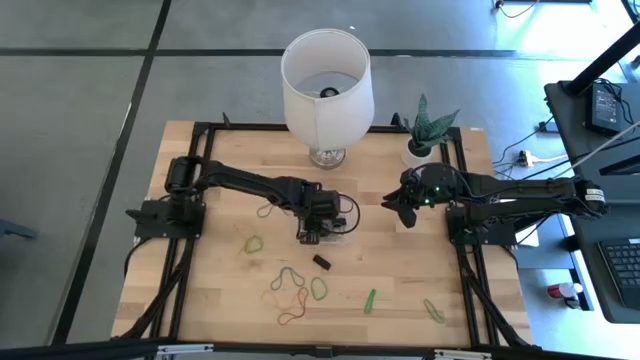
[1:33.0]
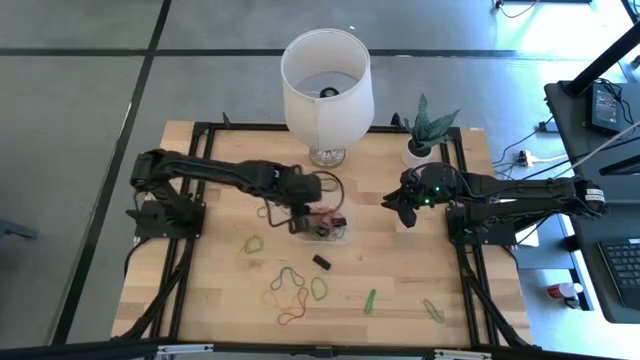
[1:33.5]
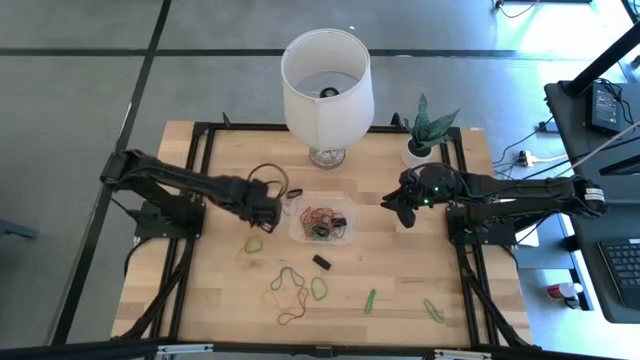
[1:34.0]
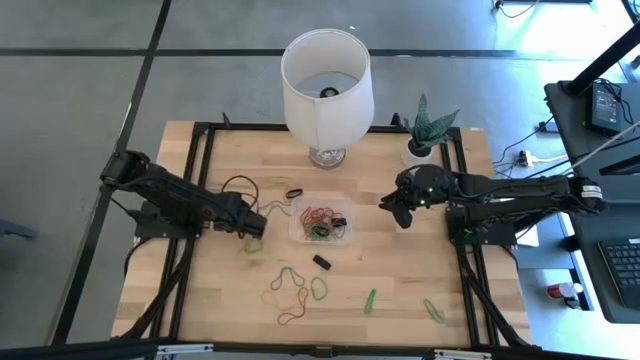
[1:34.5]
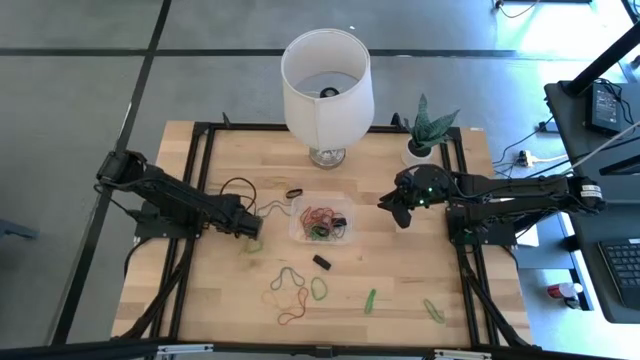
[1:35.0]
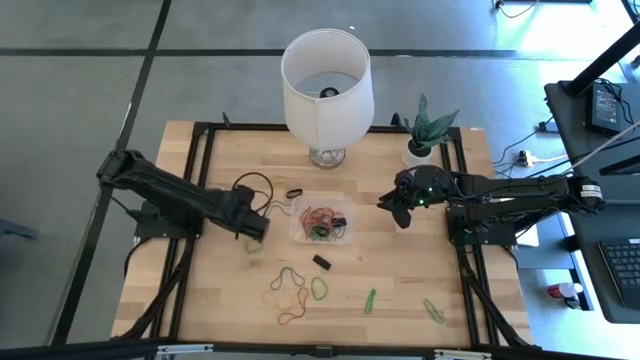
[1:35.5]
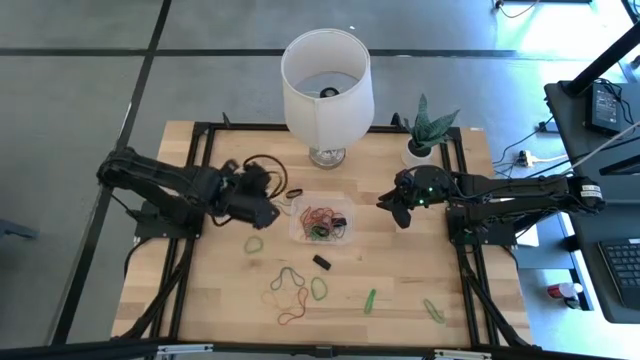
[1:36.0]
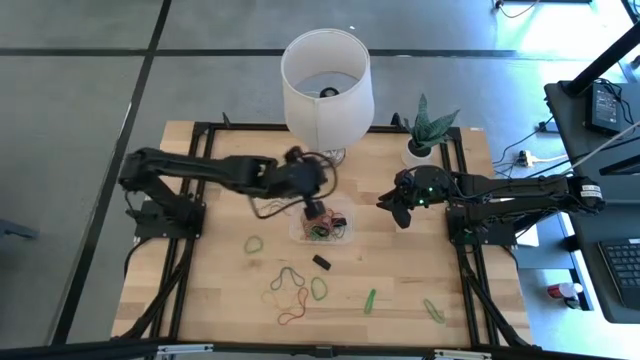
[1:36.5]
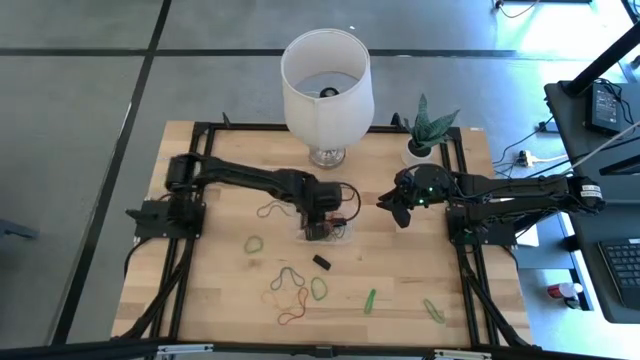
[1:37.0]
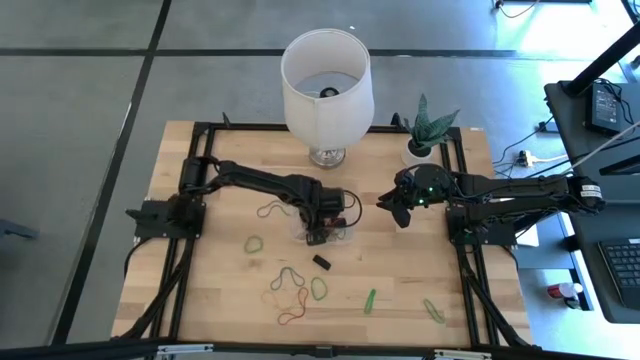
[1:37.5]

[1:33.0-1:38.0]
Task: Pick and place rubber bands into bin
Put the left yellow rubber band into the container

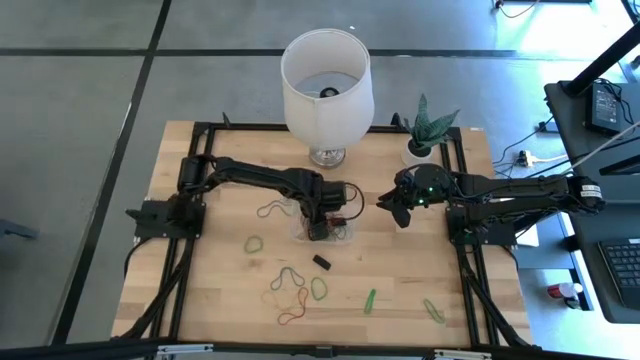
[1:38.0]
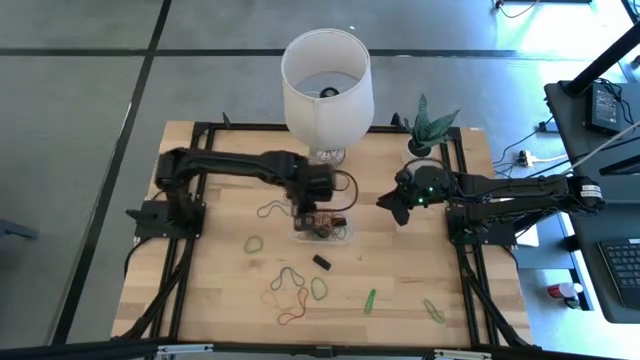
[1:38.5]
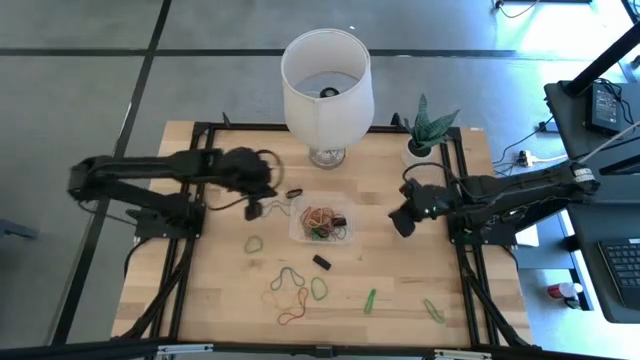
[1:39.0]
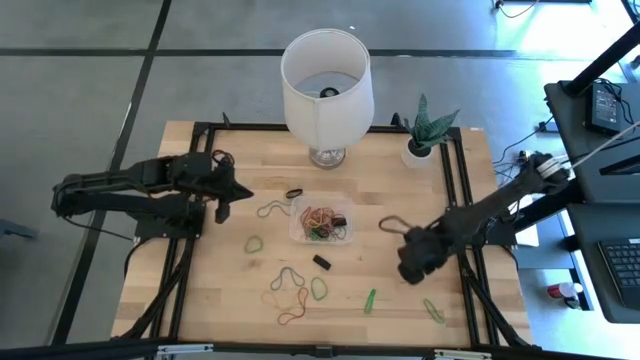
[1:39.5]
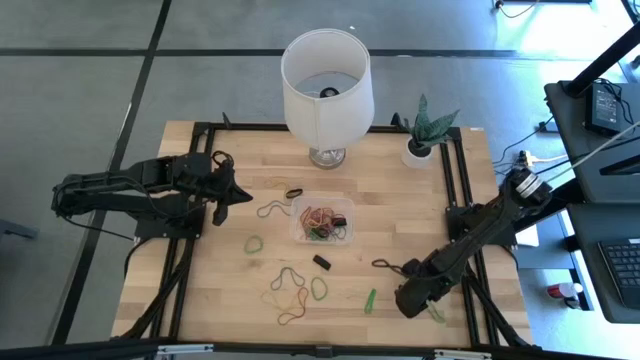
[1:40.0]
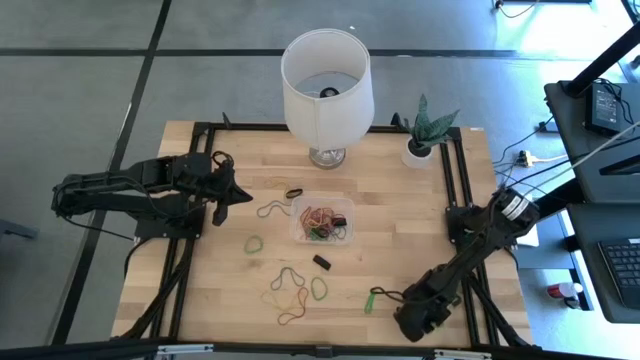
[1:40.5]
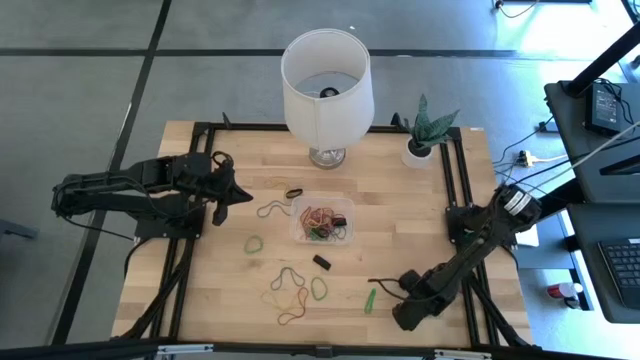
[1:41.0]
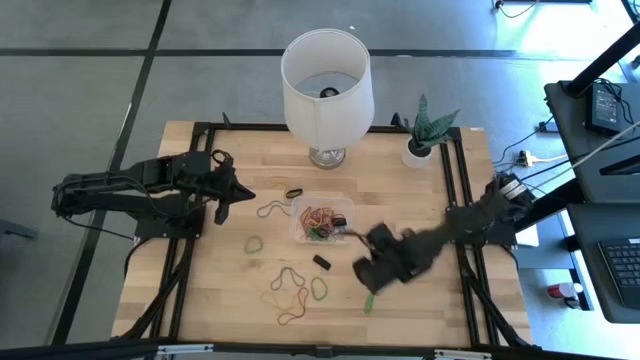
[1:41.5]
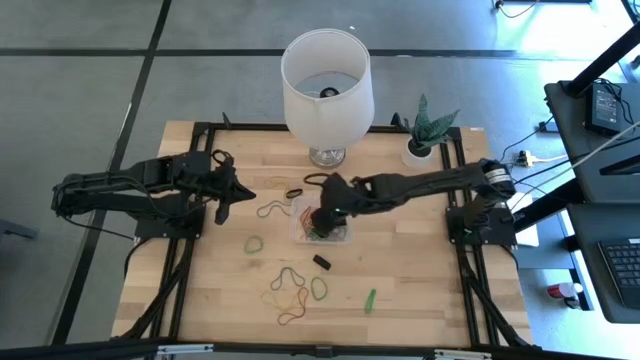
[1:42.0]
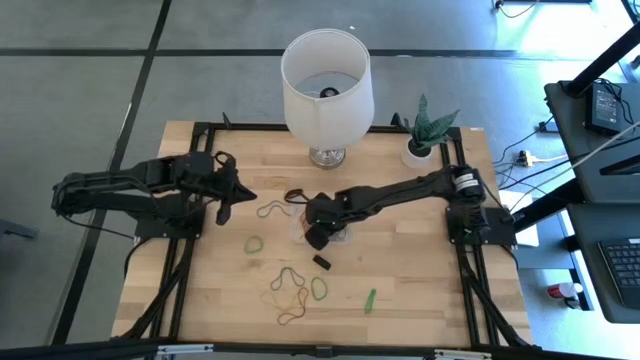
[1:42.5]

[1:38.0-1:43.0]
Put the green rubber band into the container

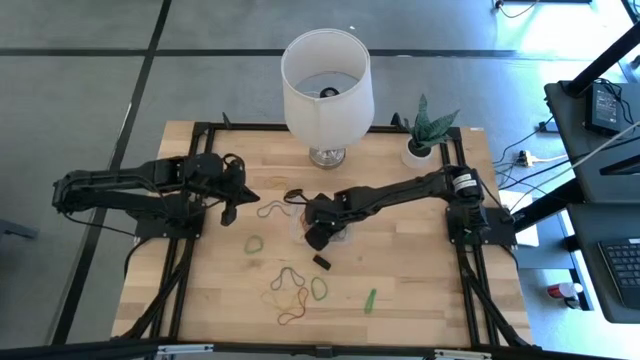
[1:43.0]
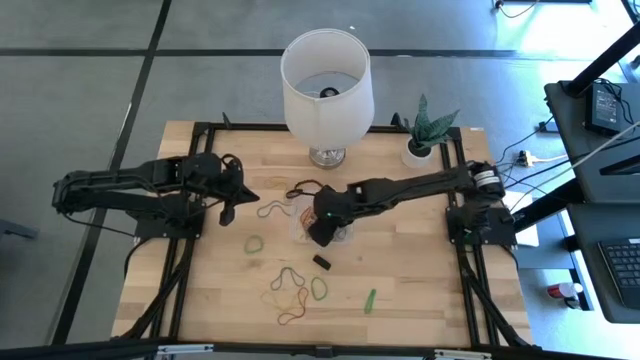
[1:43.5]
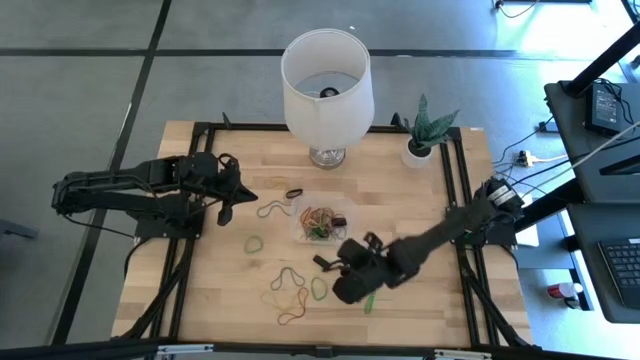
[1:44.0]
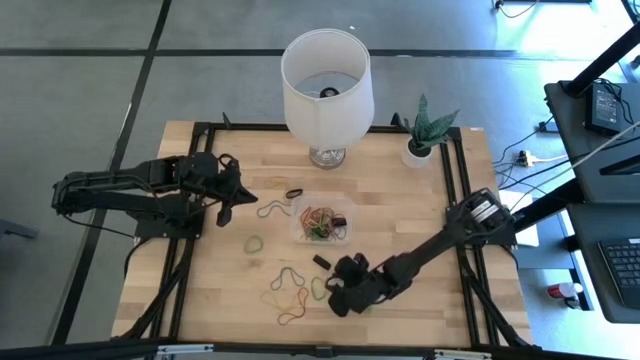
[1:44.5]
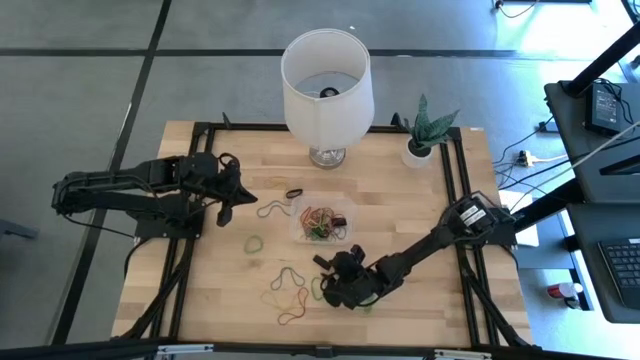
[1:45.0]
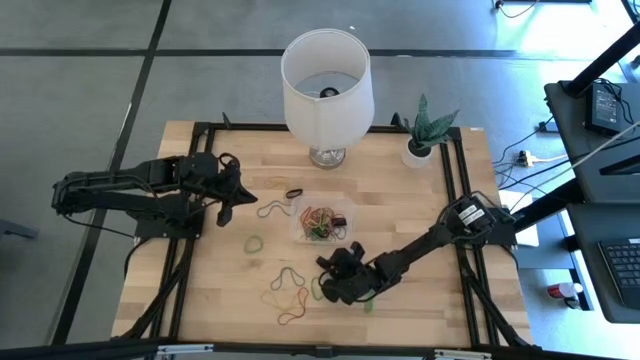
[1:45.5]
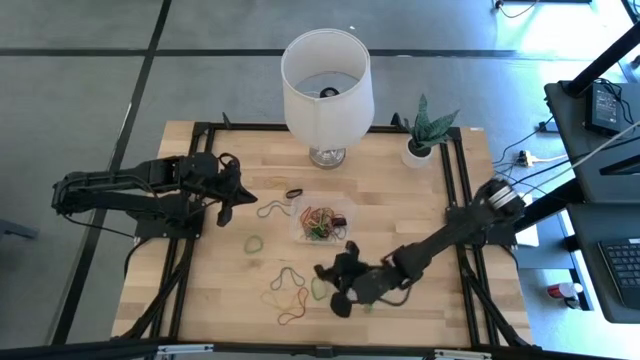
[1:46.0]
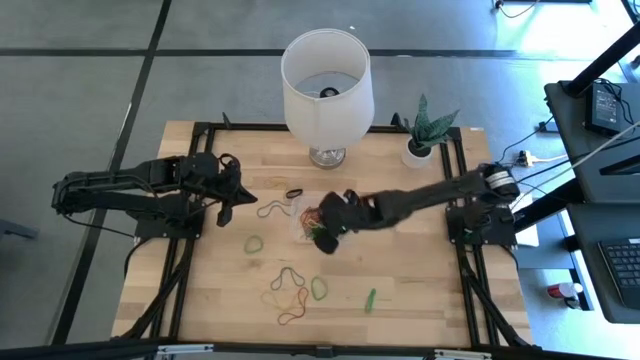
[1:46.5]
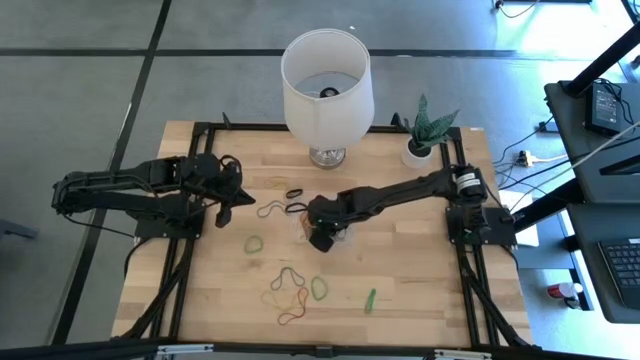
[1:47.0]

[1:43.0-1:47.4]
Put the right black rubber band into the container

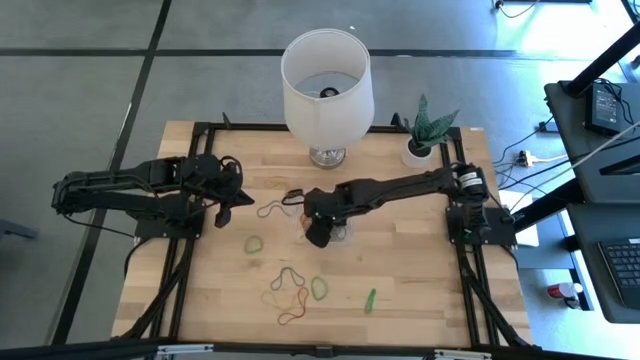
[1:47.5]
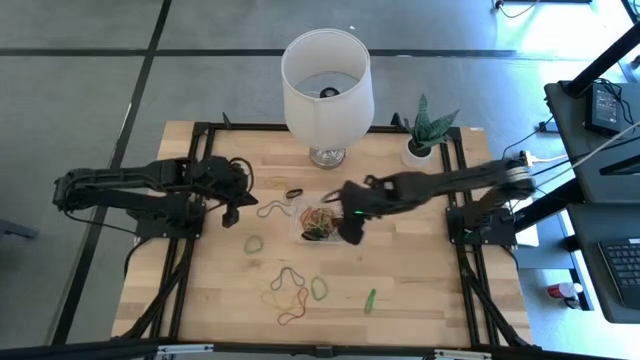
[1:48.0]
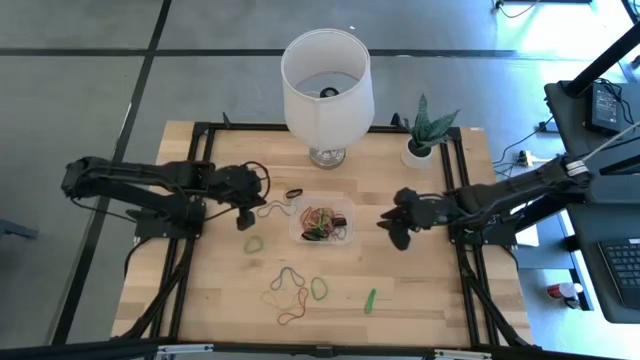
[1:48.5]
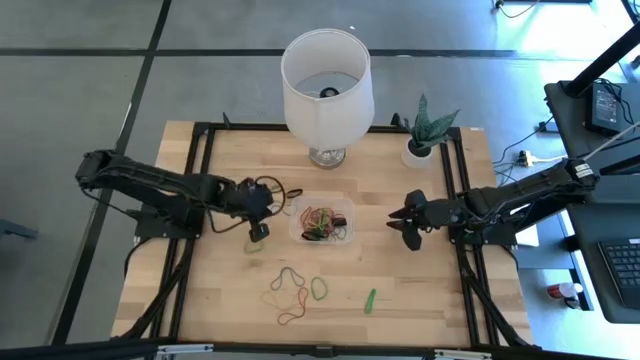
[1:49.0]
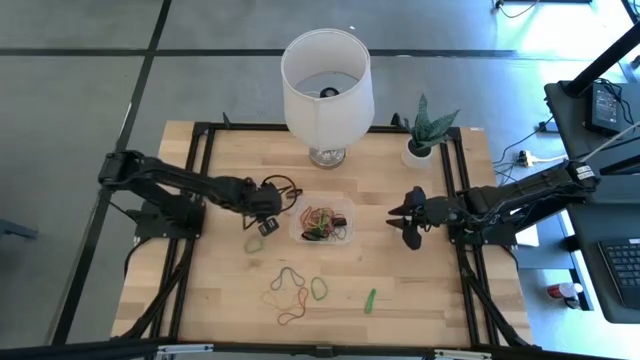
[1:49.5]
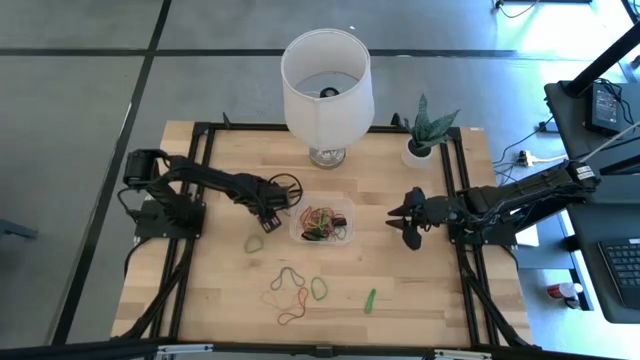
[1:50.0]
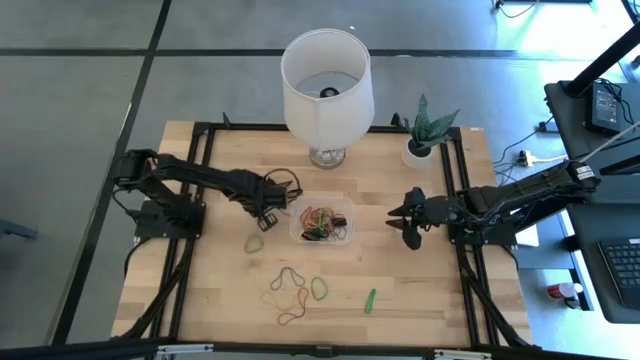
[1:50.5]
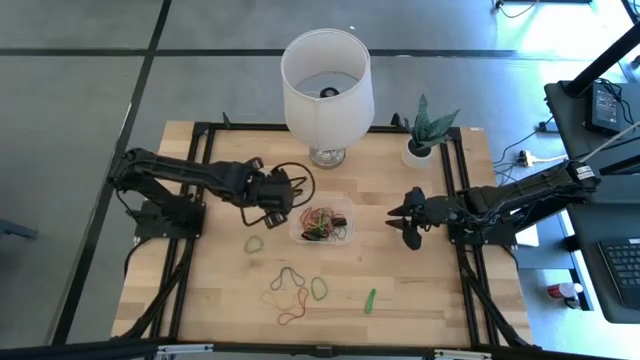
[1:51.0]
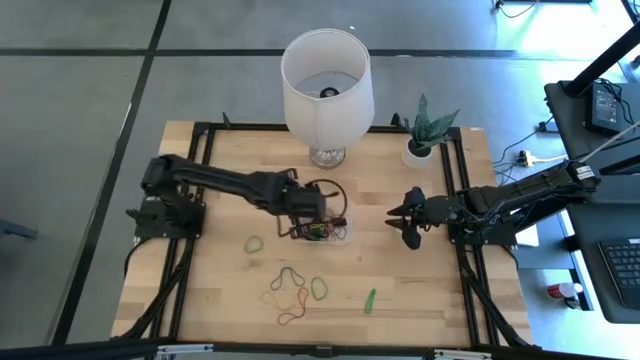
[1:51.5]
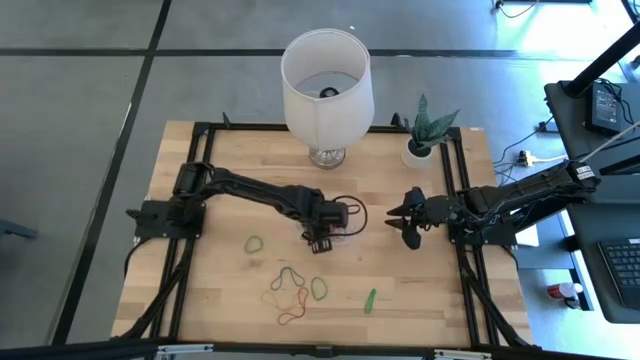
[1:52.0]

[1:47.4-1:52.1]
Put the left blue rubber band into the container

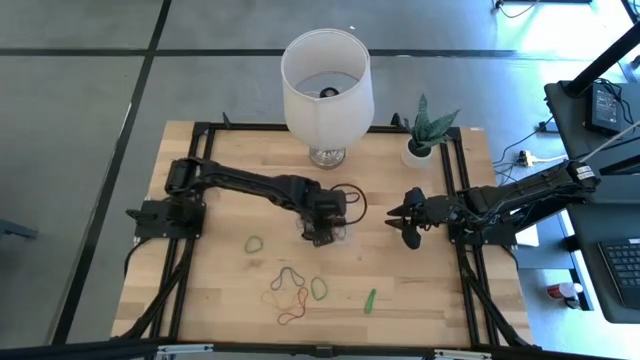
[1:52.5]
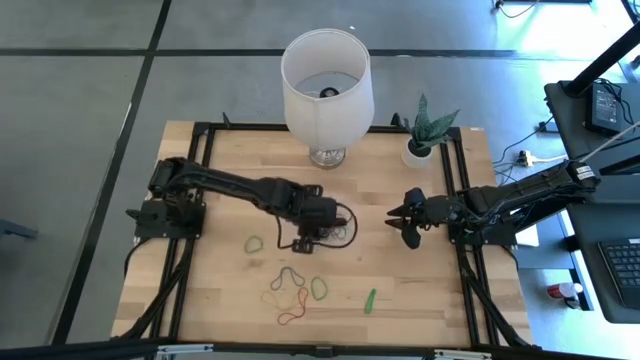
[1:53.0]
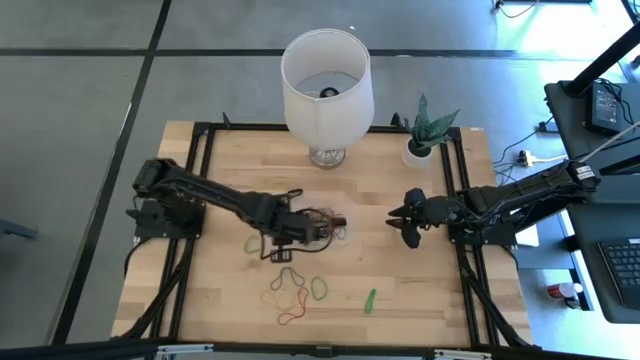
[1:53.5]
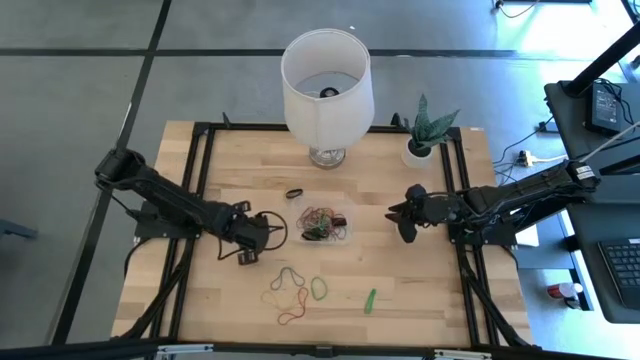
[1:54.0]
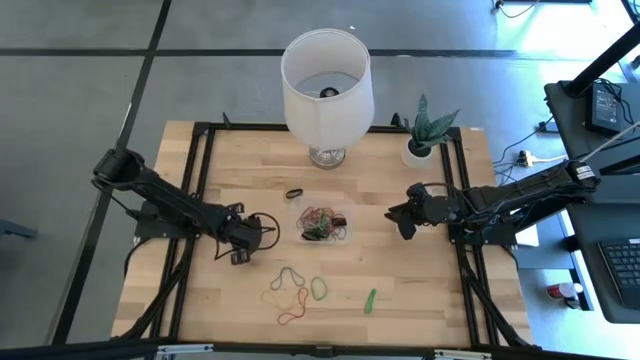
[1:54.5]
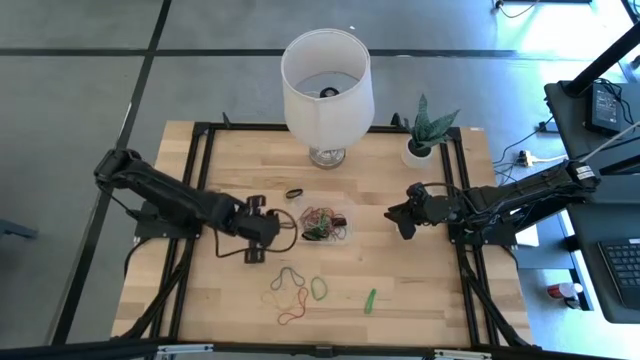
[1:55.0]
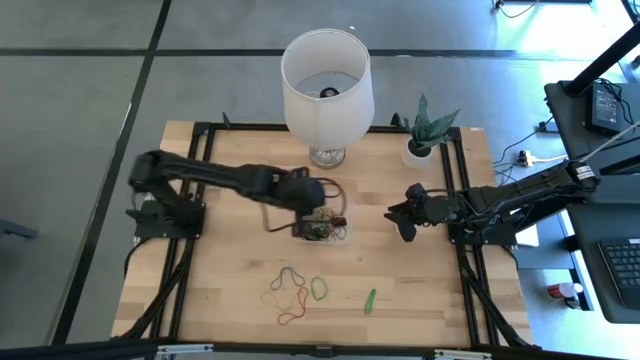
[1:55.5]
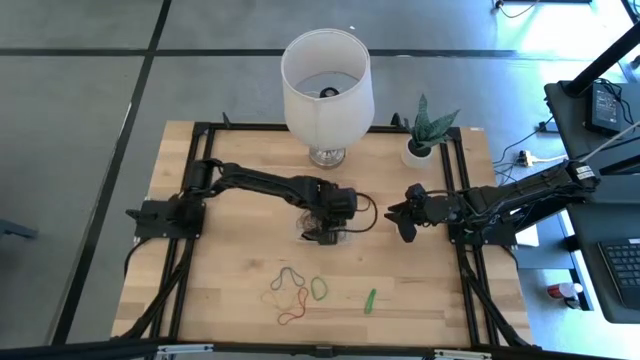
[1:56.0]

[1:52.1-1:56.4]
Put the left green rubber band into the container
